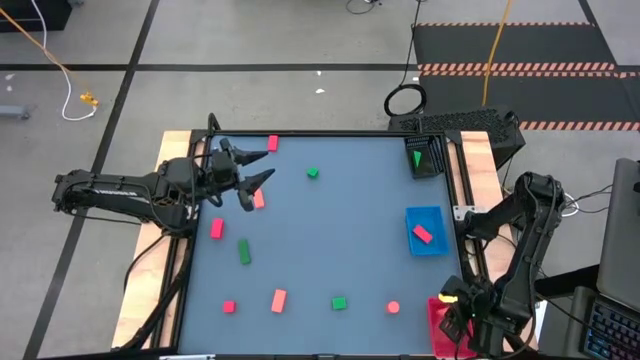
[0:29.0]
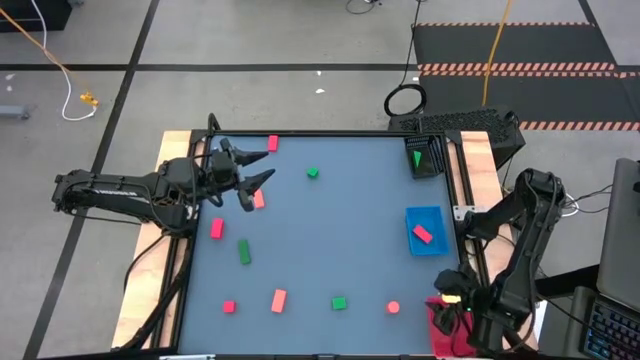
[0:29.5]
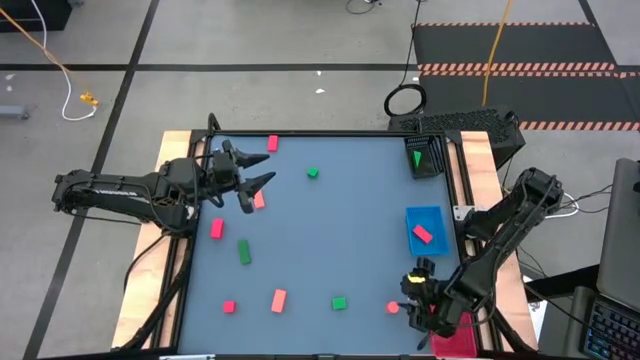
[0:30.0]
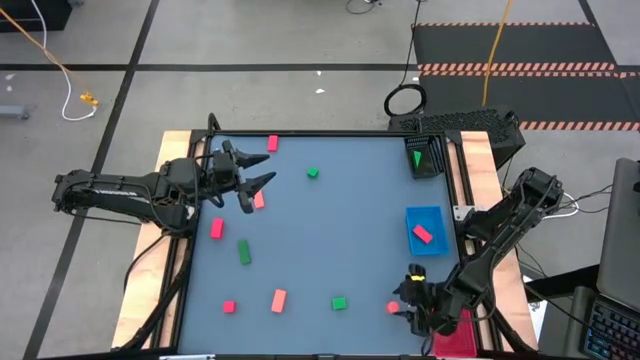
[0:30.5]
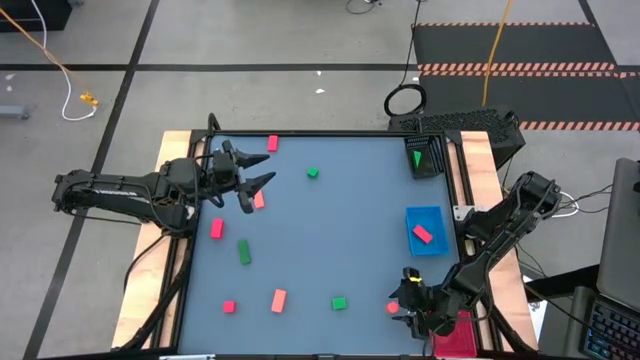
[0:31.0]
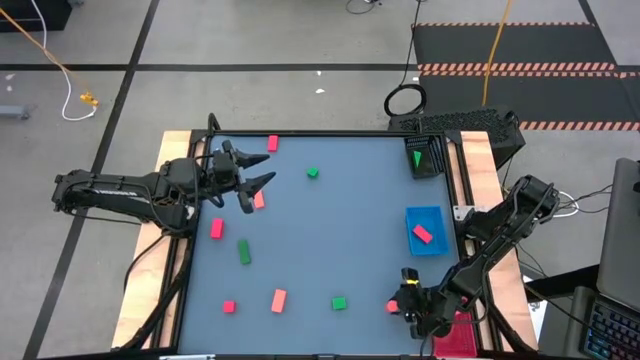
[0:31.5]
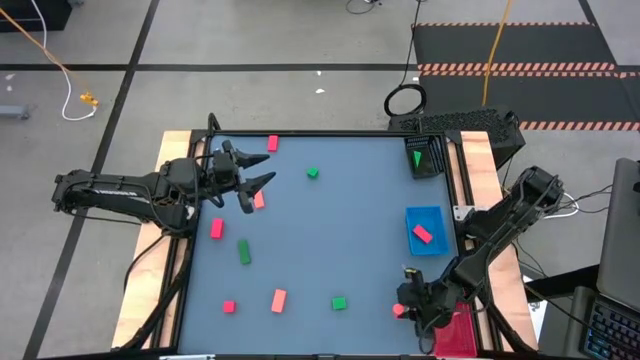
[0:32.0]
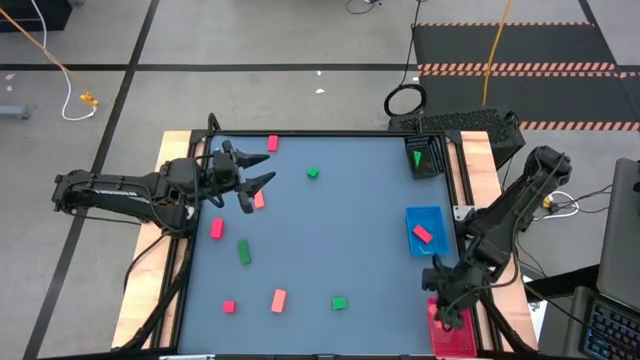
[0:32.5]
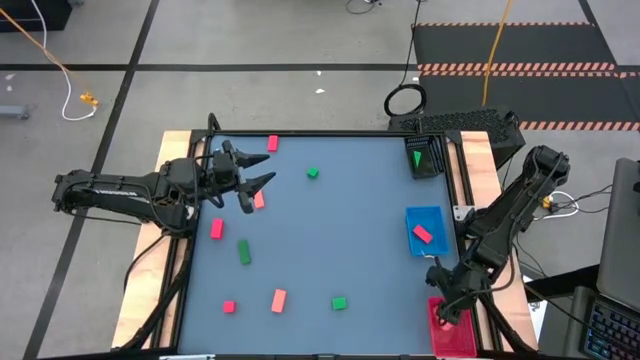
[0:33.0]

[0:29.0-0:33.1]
Task: Sort & place blocks by color
Put the orange block into the red bin

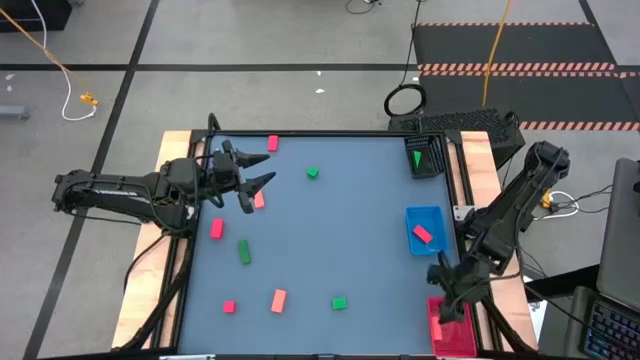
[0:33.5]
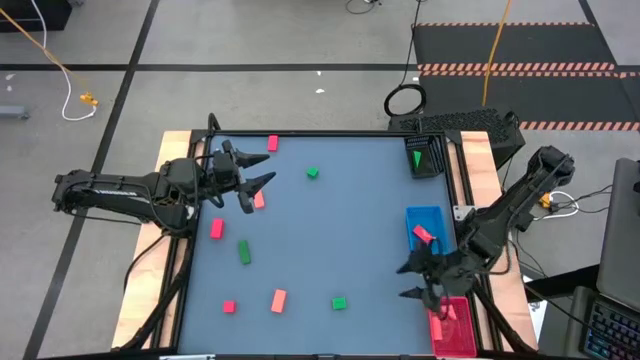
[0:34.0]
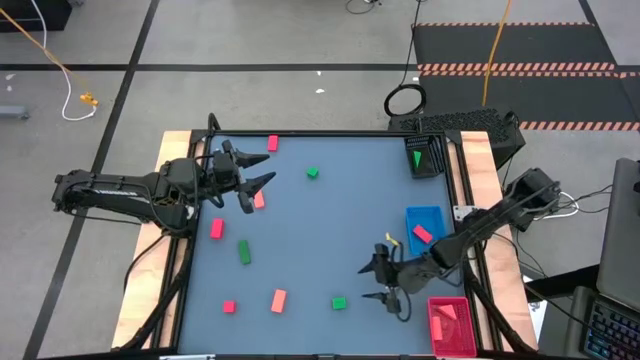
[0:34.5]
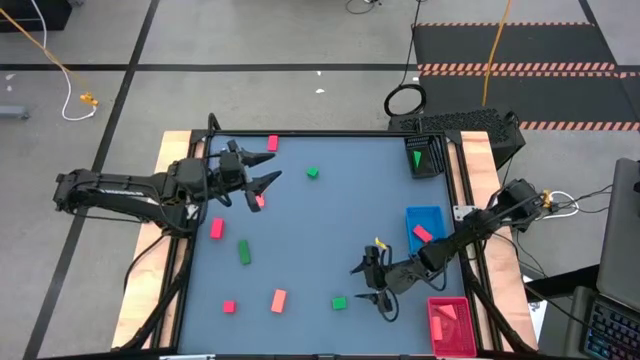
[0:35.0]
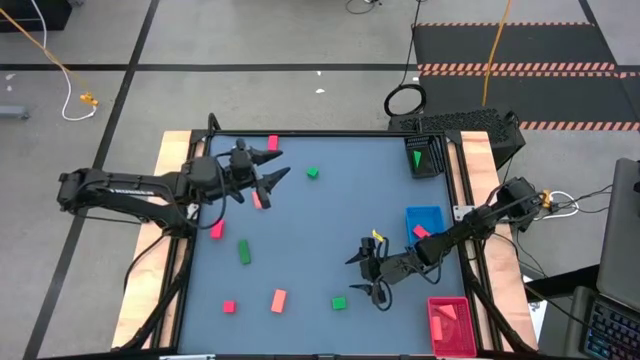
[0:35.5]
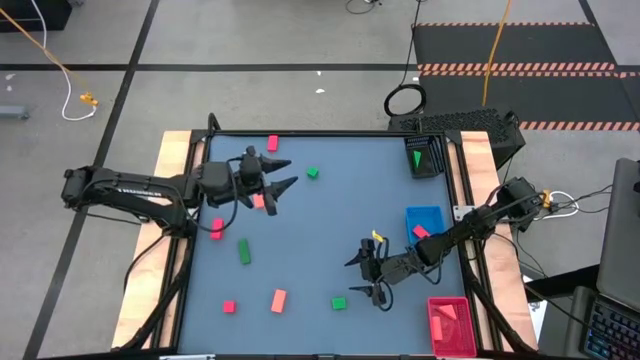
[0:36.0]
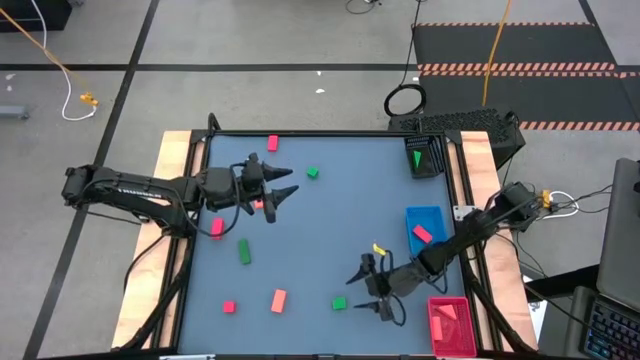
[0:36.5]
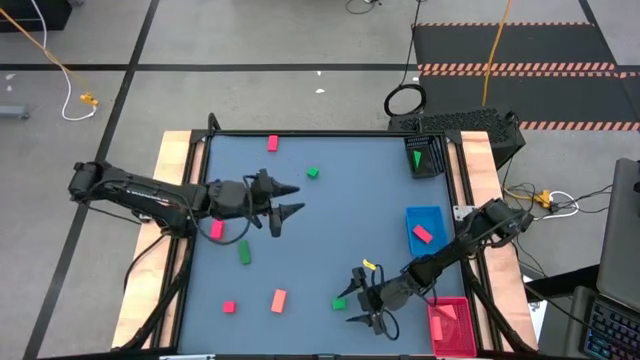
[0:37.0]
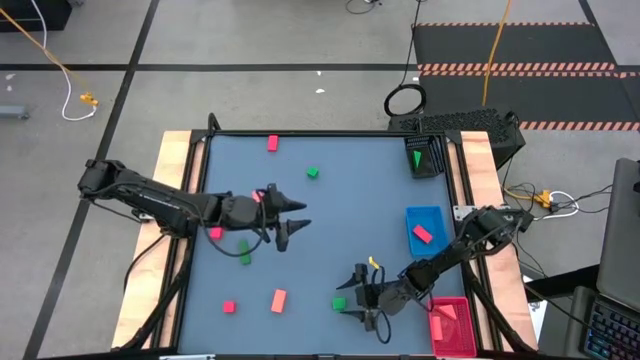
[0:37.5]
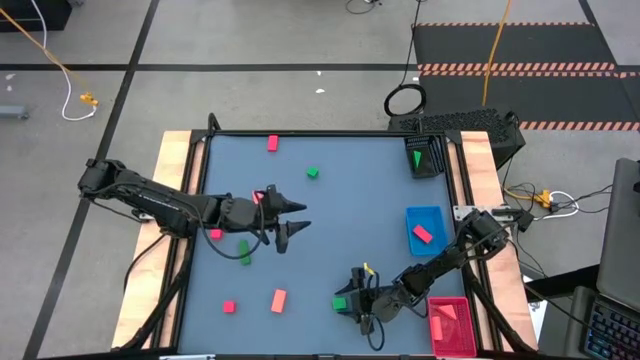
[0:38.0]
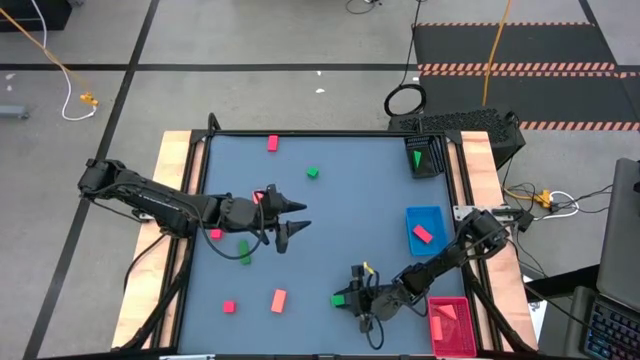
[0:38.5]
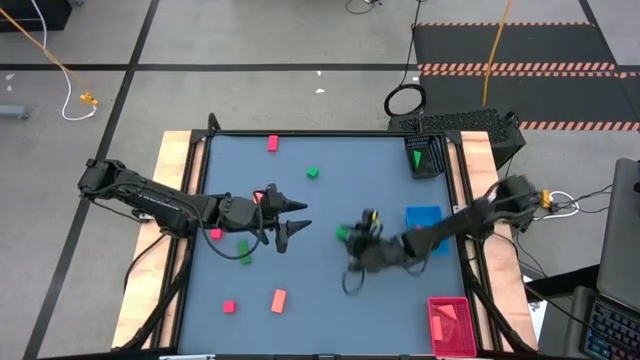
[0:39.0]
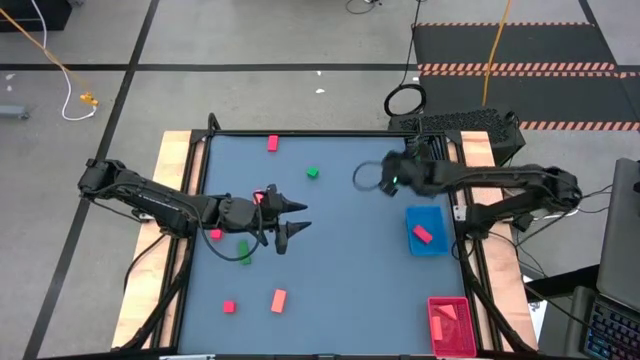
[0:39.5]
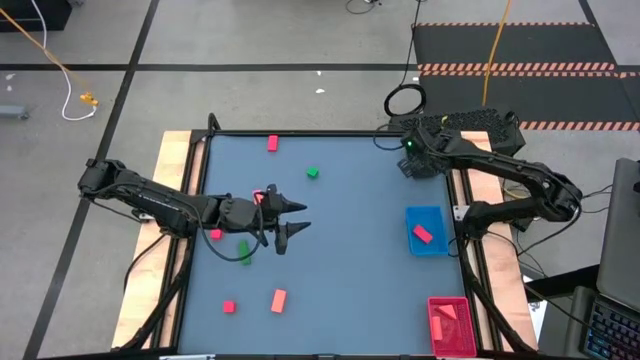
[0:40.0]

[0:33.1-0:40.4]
Put the green block into the black bin

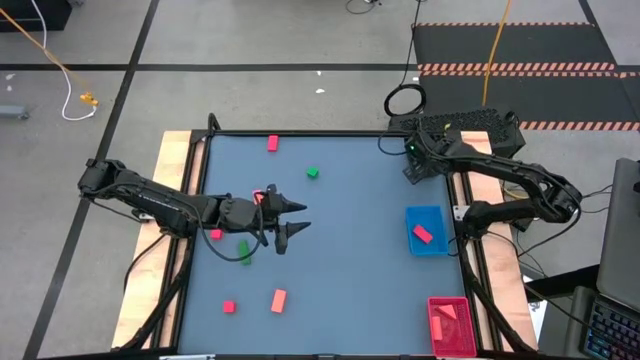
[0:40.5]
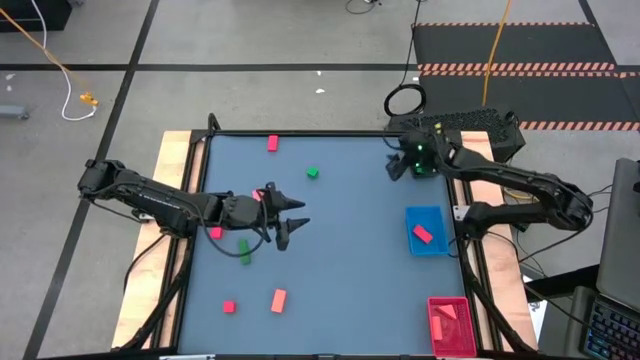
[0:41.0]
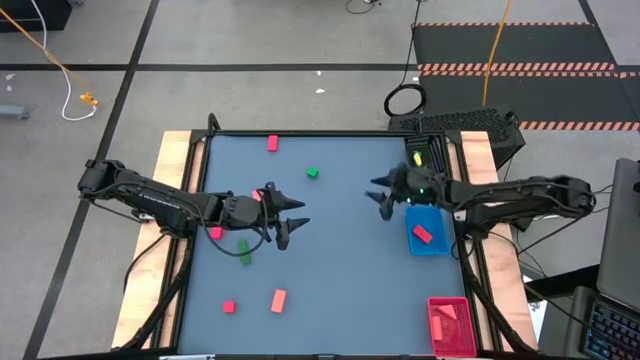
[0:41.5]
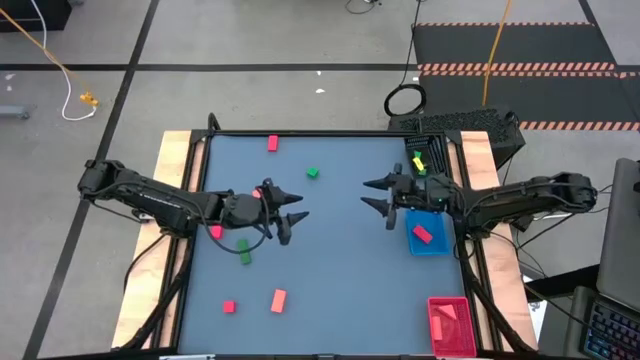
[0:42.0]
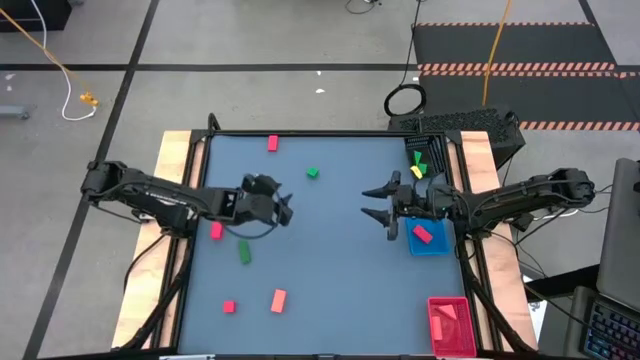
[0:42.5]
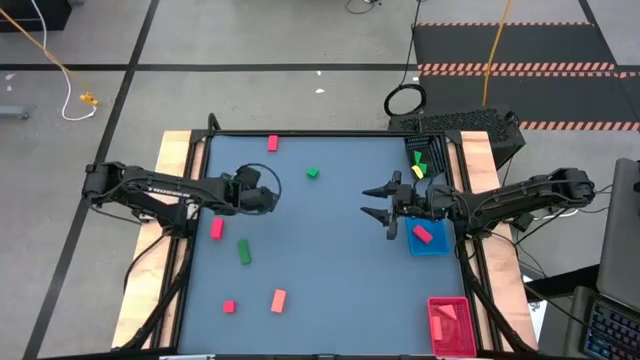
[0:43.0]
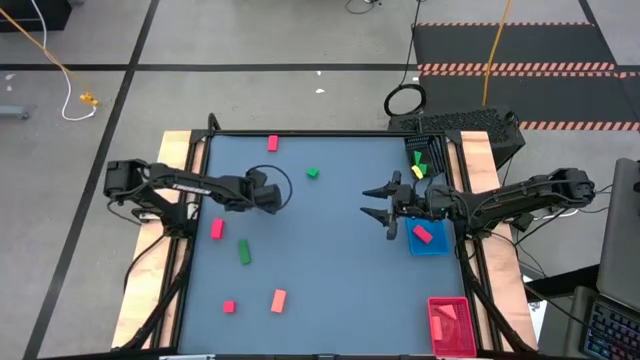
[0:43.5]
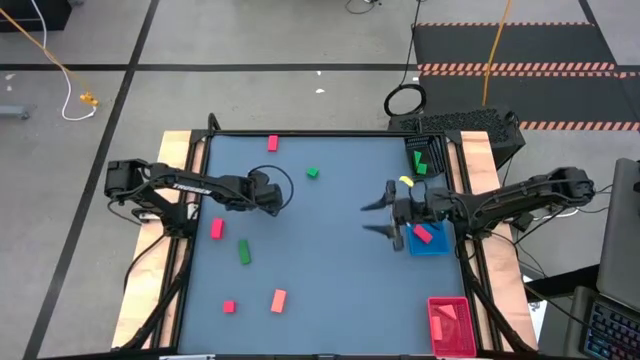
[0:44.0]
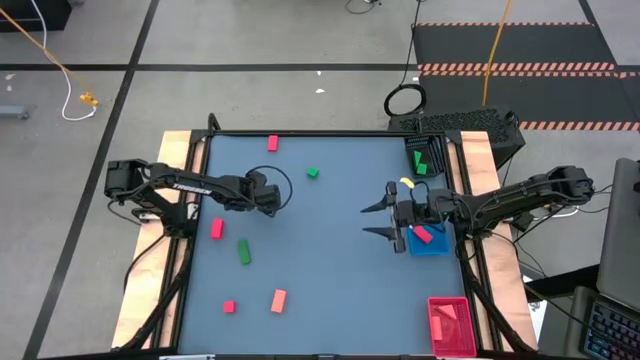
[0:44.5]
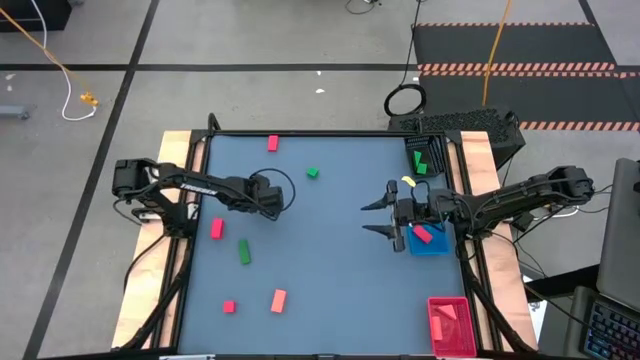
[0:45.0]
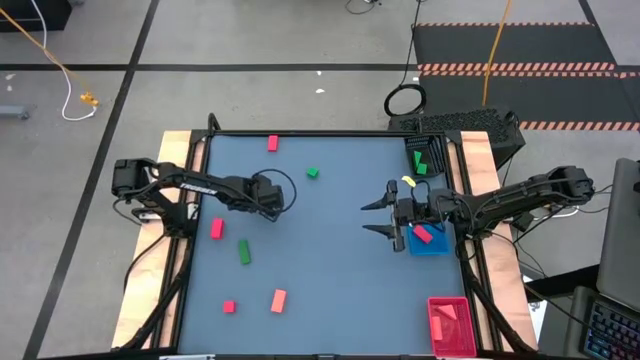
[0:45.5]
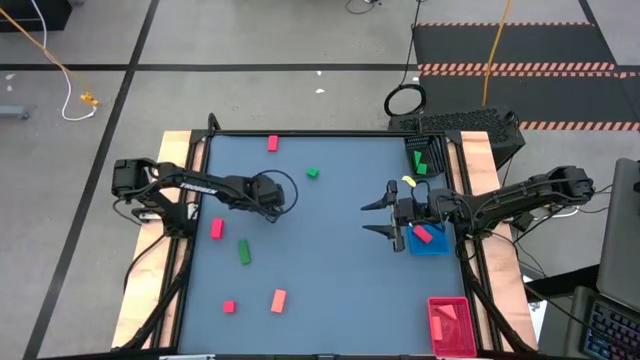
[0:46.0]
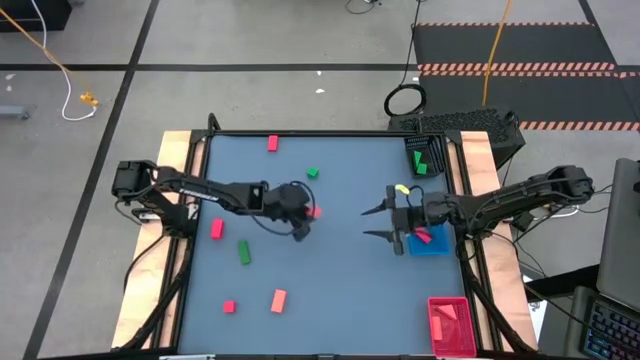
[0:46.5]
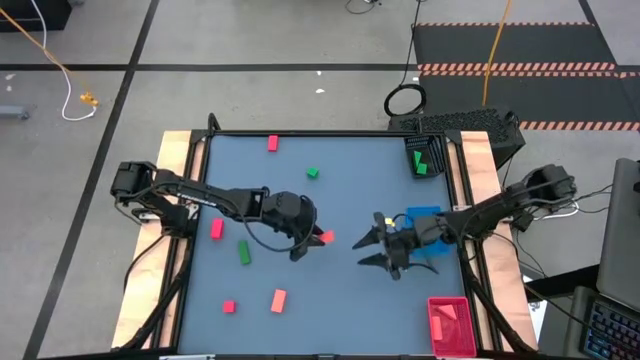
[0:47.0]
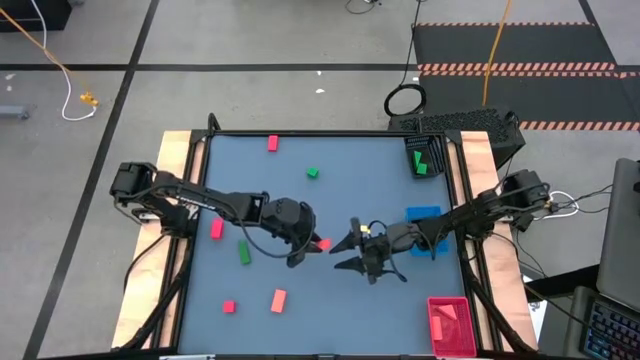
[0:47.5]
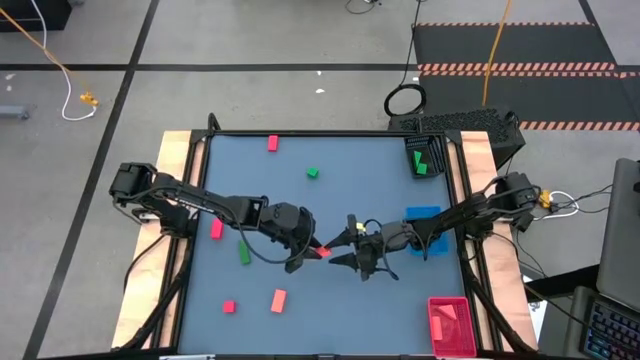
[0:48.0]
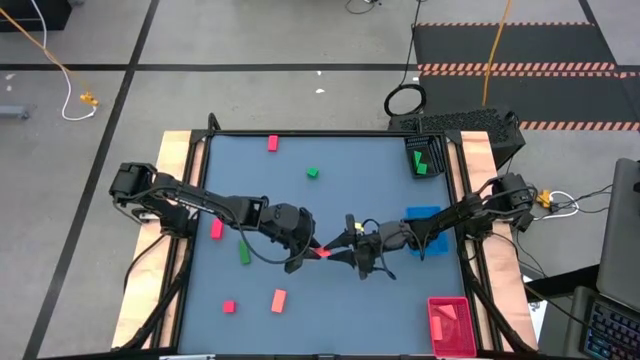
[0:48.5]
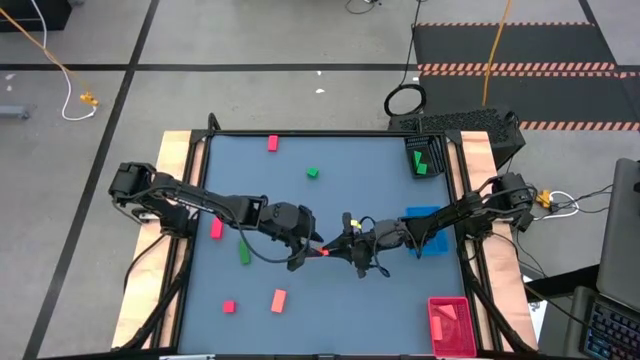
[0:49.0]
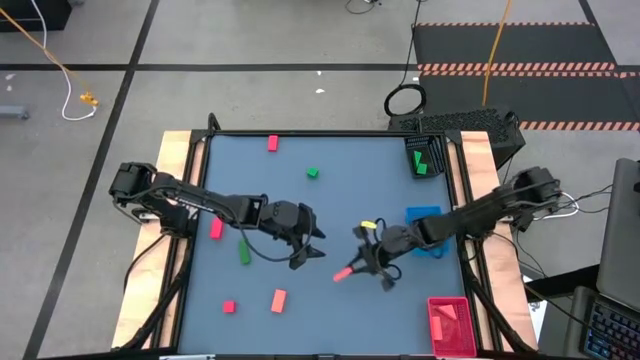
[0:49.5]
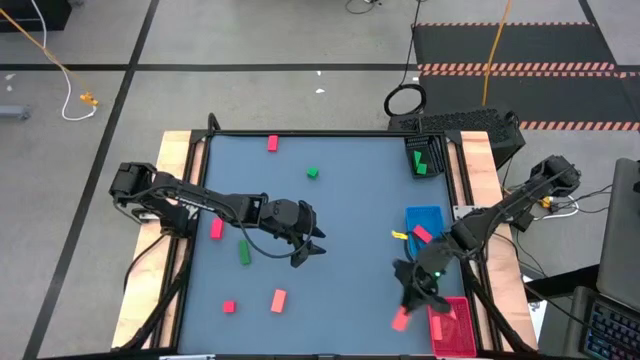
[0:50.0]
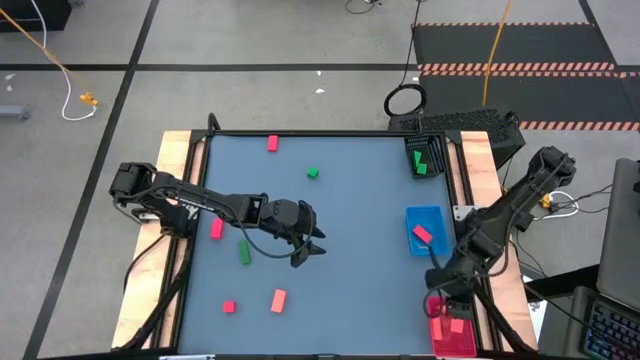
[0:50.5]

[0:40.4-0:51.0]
Put the orange block into the red bin
